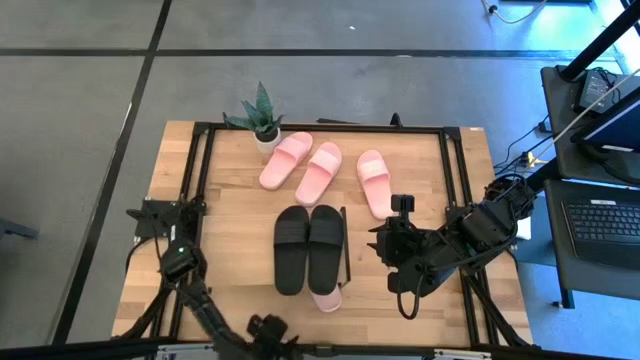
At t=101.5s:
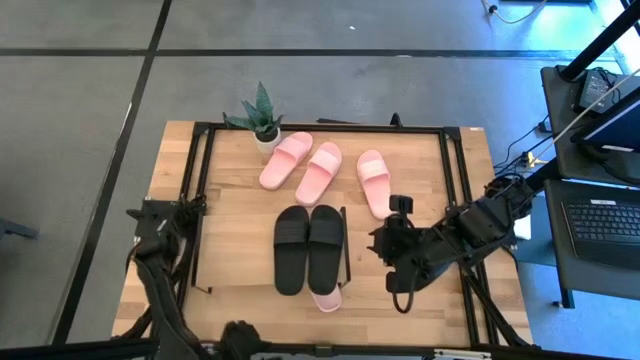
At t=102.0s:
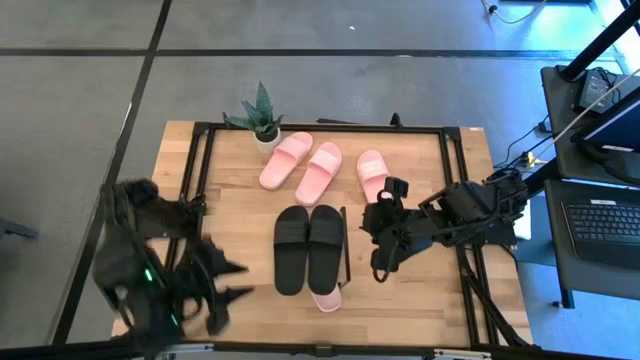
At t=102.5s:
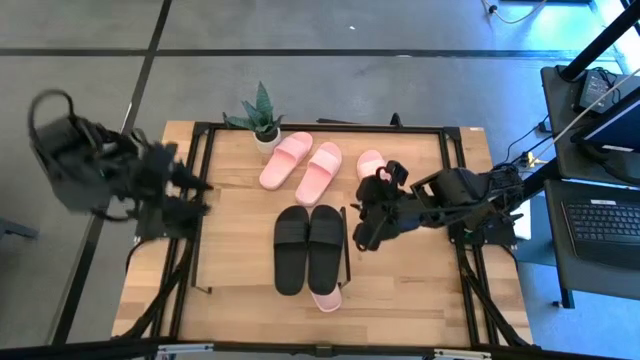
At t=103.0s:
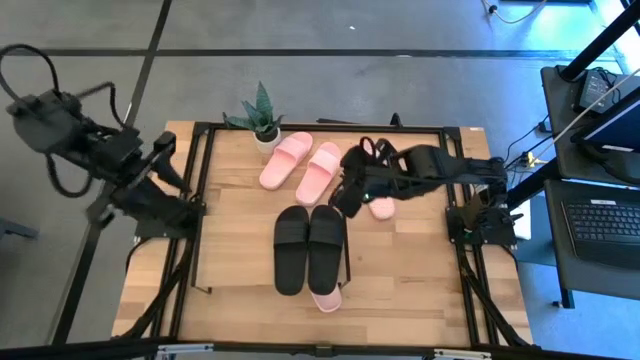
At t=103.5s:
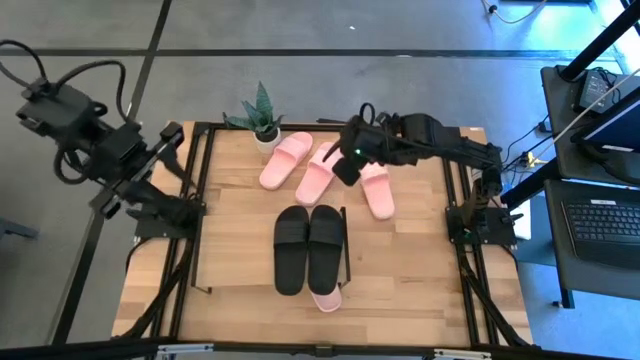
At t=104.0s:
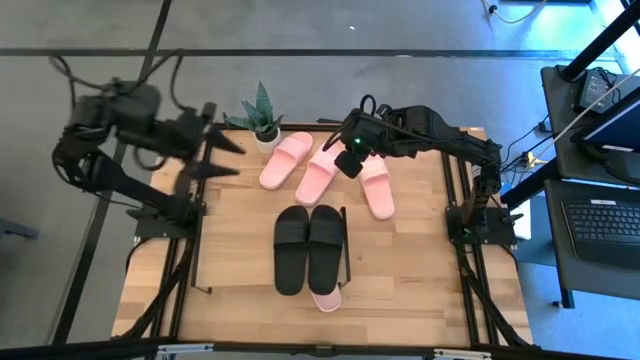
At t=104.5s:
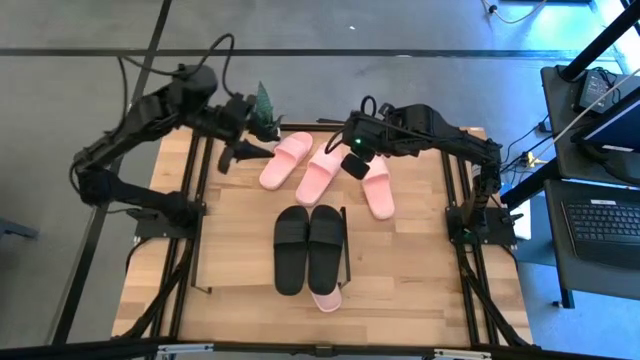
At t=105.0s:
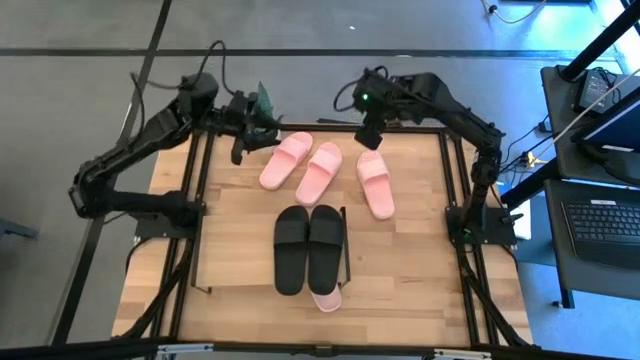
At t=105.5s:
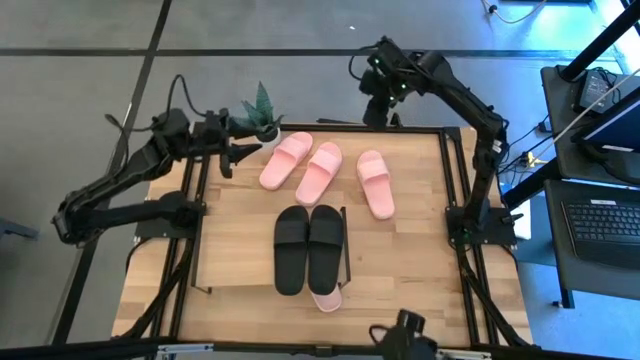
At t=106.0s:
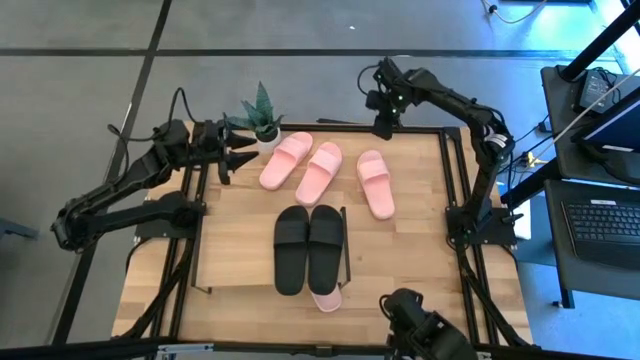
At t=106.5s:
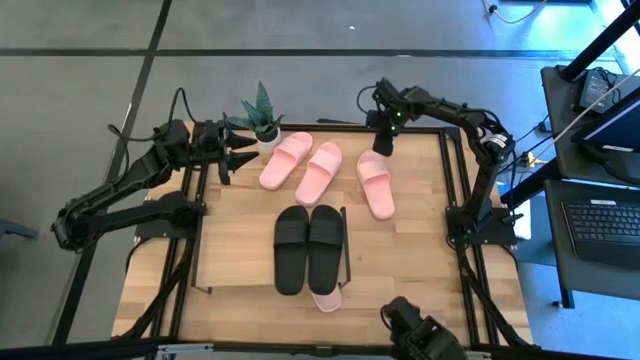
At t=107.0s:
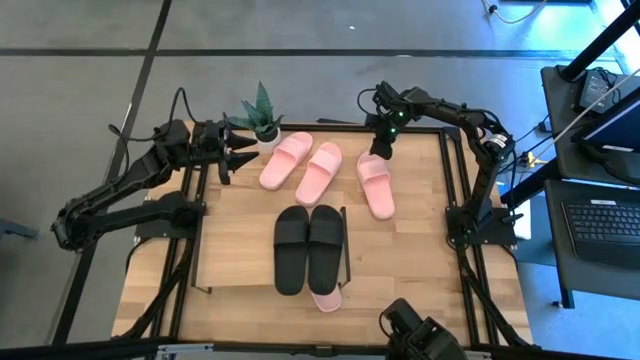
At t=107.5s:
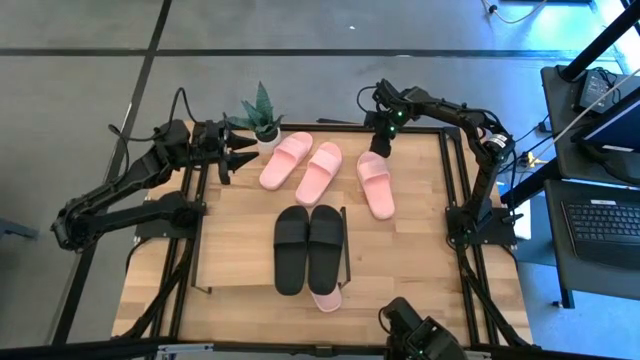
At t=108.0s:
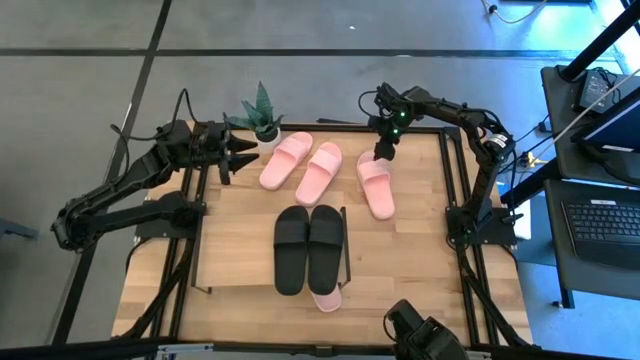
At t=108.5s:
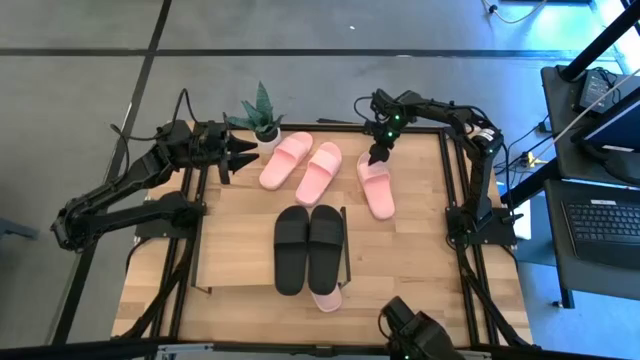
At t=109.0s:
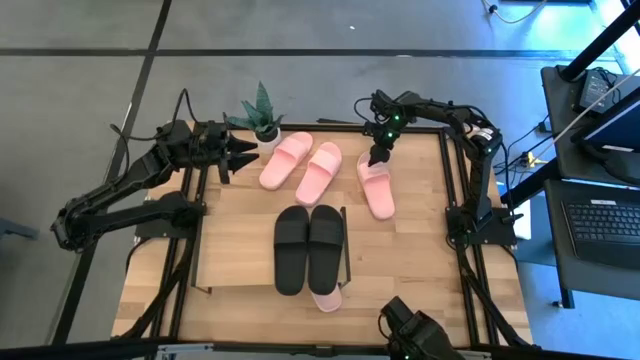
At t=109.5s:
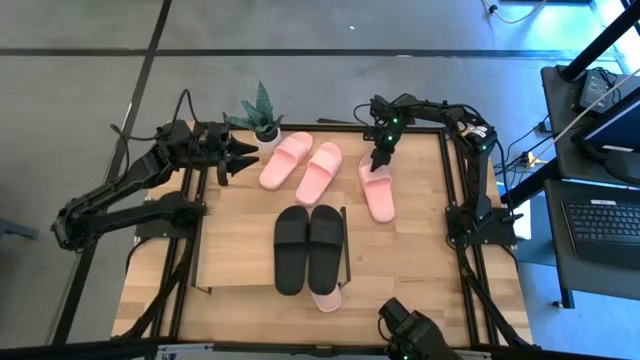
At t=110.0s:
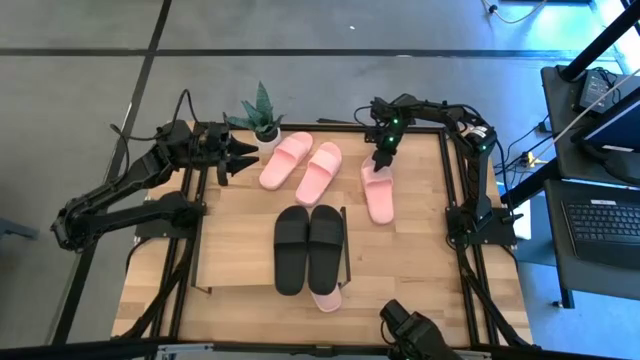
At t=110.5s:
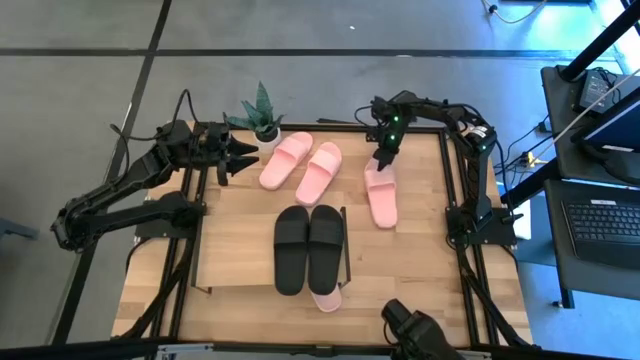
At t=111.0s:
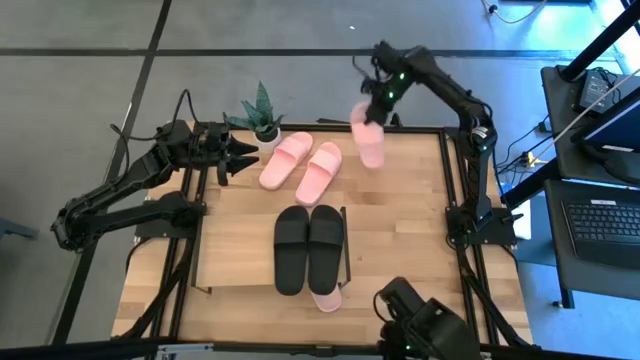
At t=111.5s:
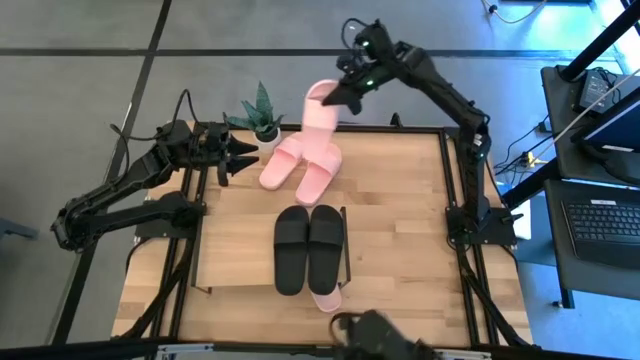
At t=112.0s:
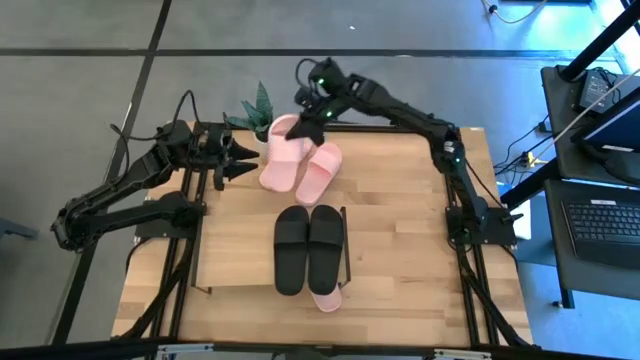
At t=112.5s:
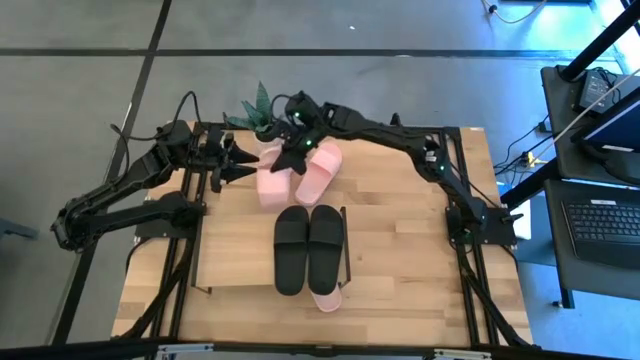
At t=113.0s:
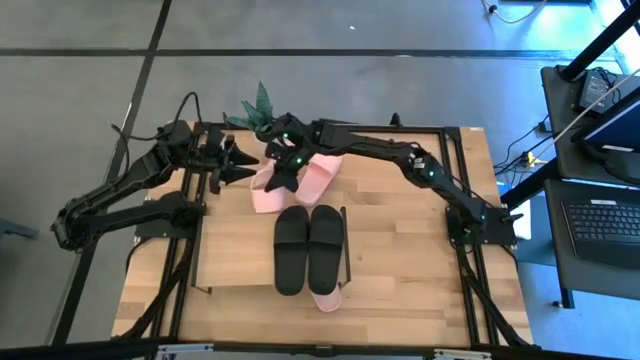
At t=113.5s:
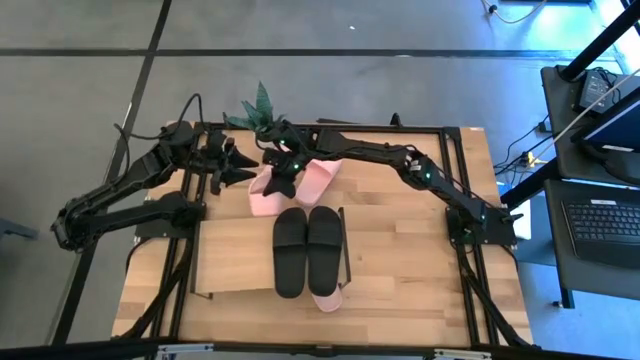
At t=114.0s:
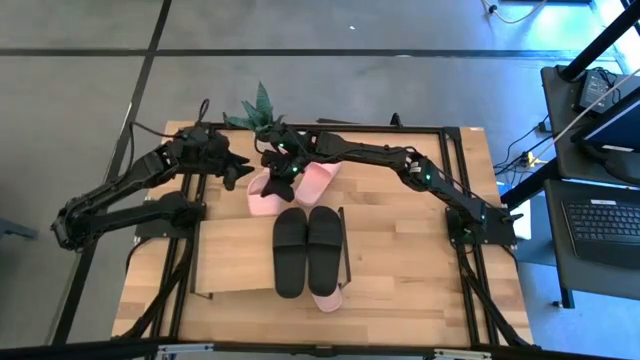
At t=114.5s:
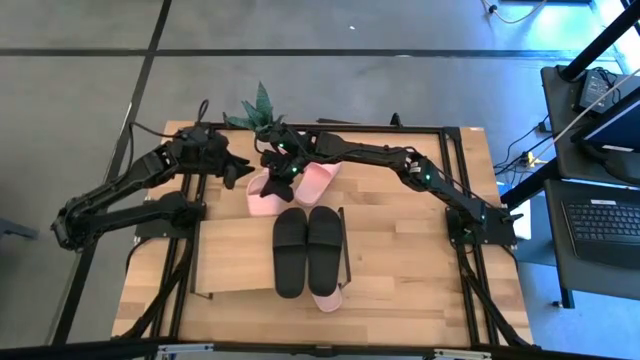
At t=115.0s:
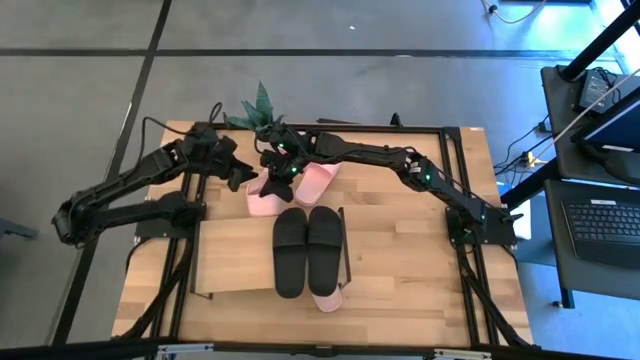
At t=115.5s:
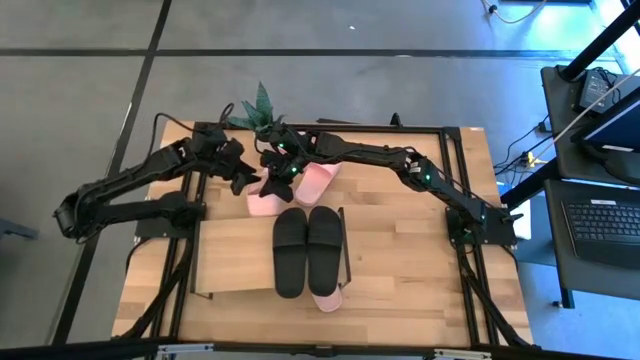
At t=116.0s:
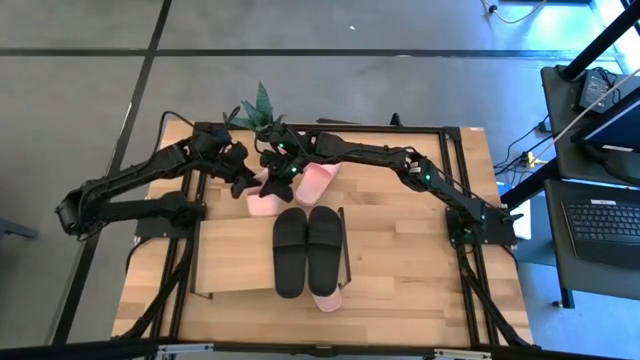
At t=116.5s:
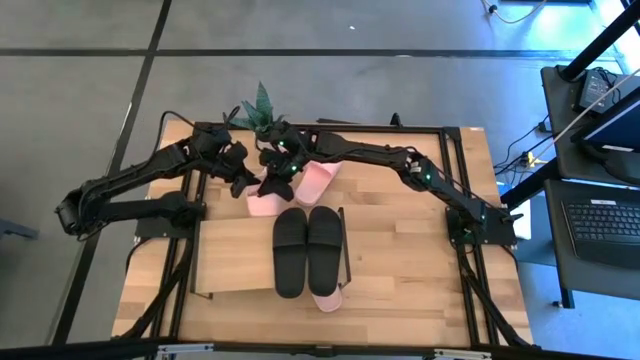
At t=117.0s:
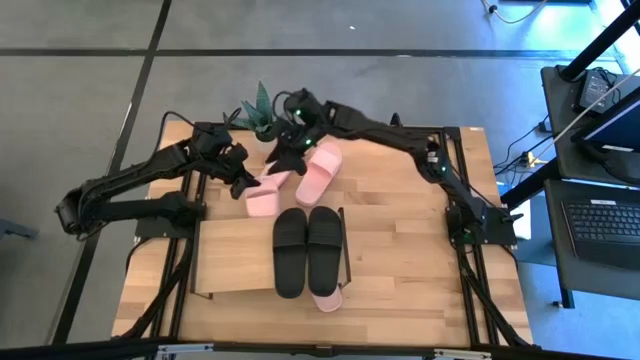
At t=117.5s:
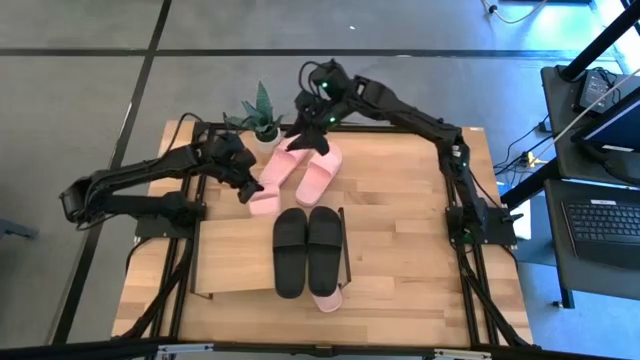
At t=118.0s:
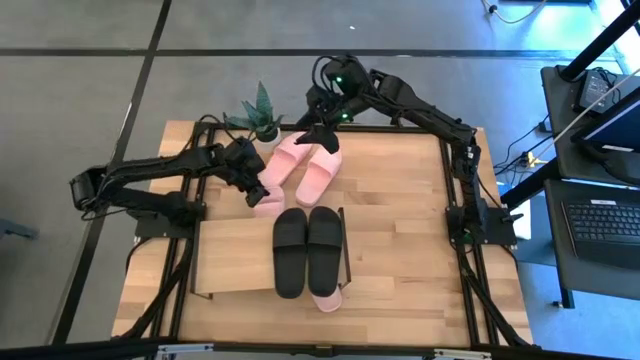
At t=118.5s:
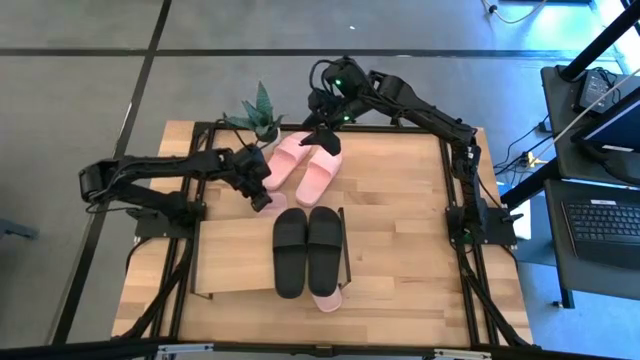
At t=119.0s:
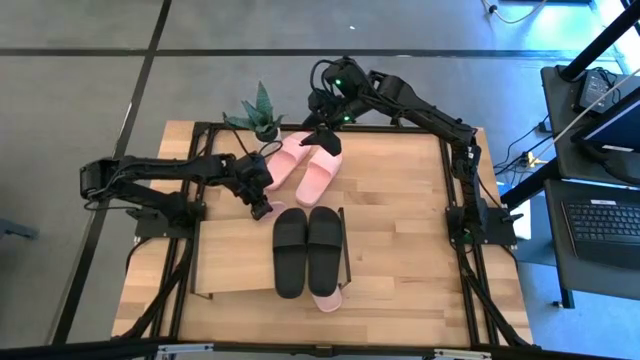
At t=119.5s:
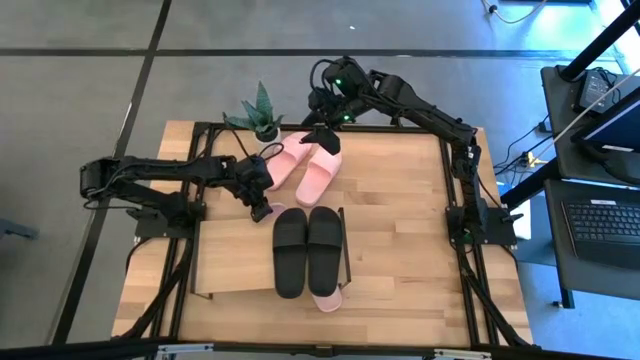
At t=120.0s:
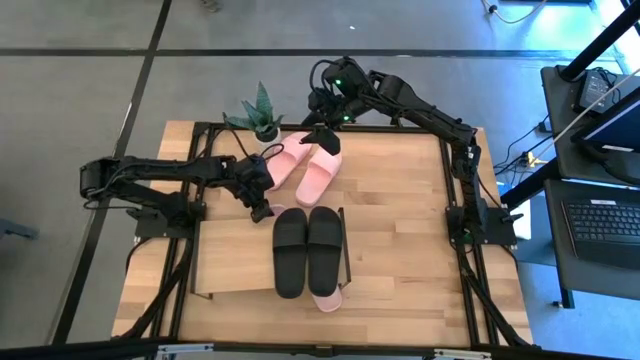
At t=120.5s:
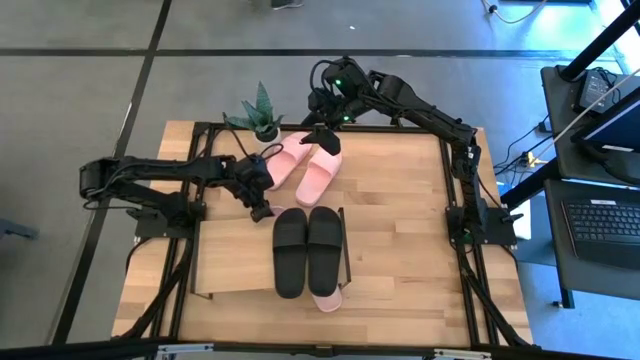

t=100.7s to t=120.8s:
Task: Pick and place slides into the shelf
Put the pink slide under the shelf

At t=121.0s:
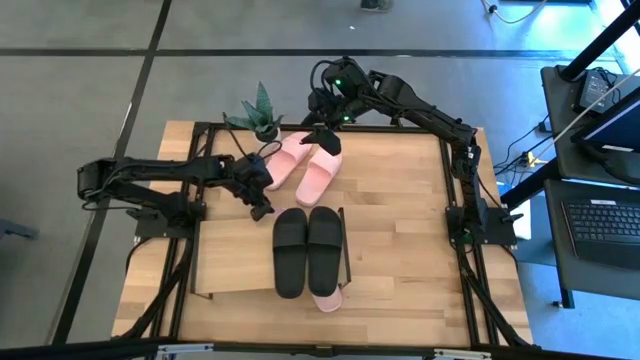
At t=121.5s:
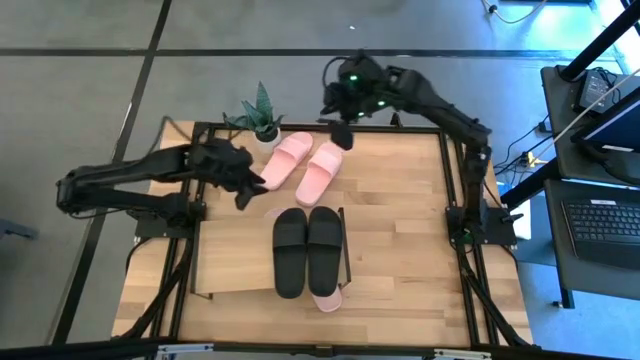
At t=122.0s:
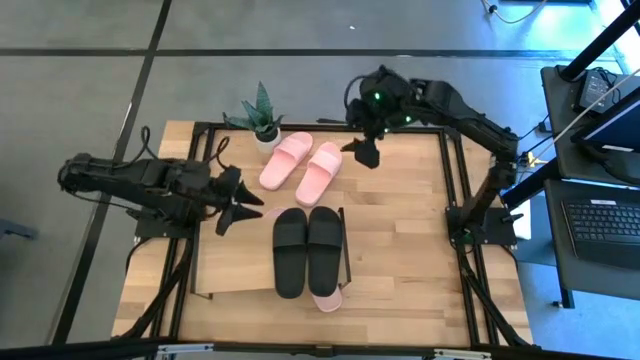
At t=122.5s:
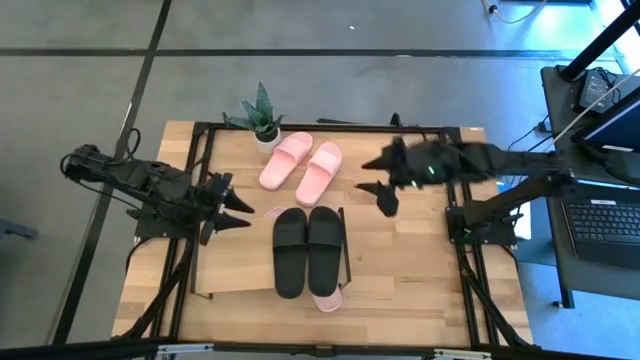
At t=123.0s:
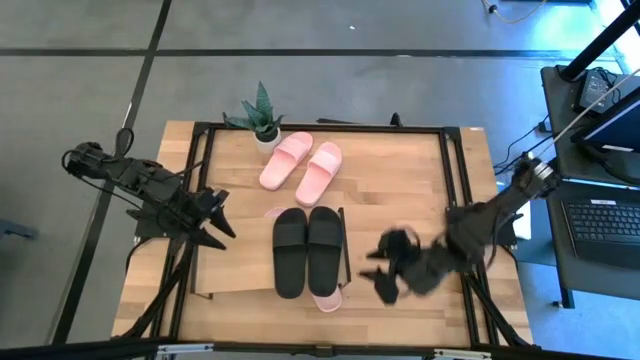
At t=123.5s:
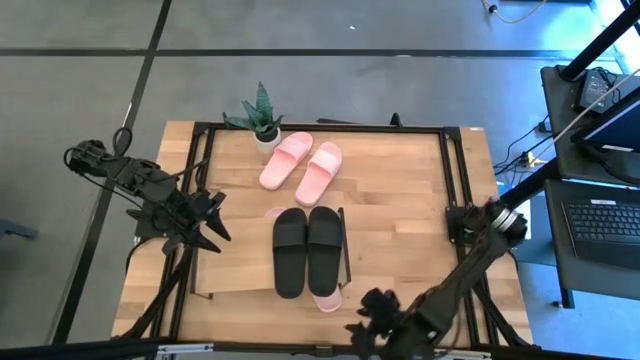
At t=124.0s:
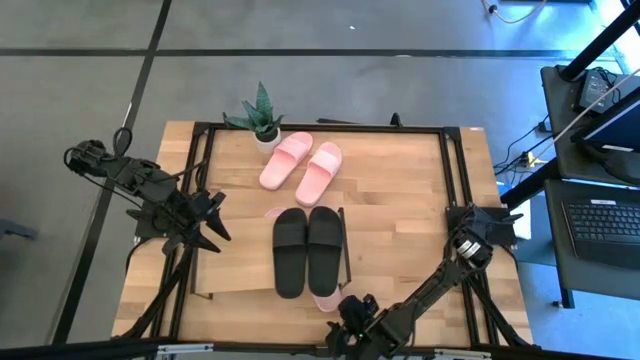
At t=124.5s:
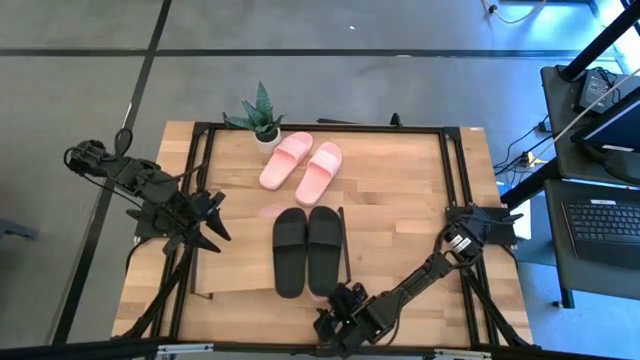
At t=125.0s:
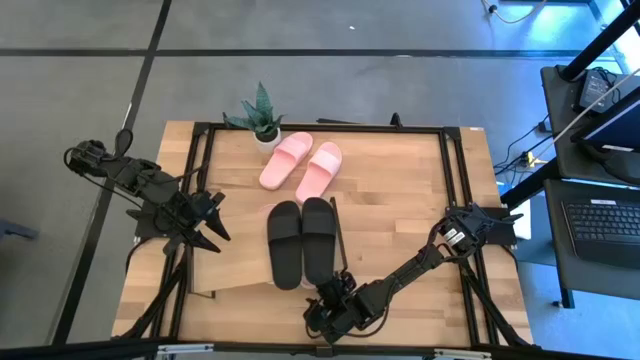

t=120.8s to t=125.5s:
Adjust the pink slide under the shelf
